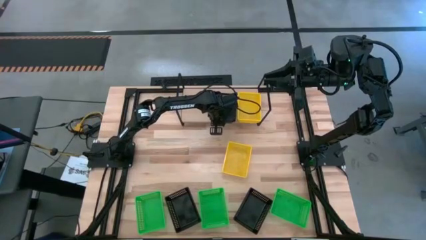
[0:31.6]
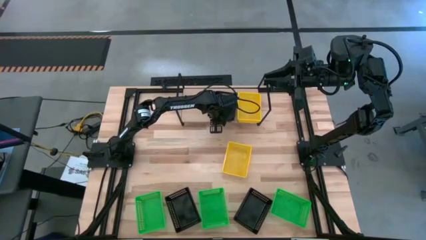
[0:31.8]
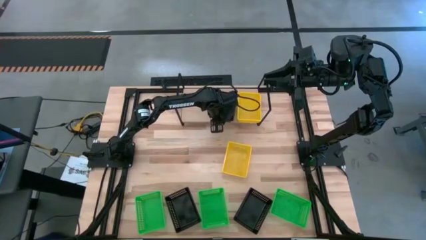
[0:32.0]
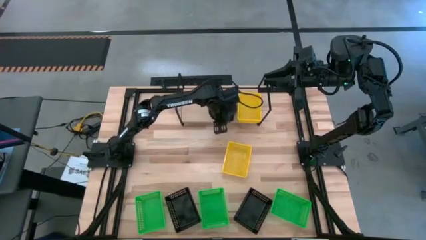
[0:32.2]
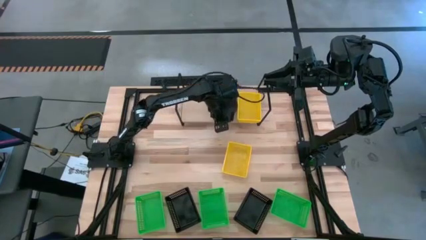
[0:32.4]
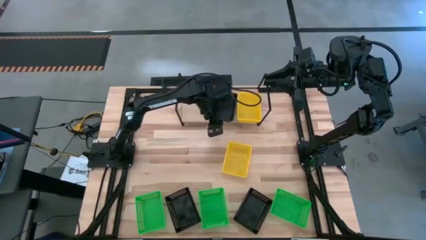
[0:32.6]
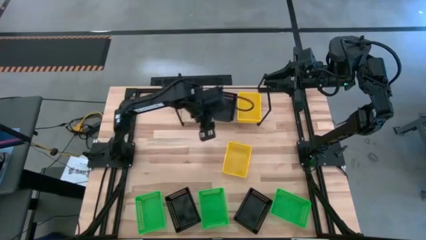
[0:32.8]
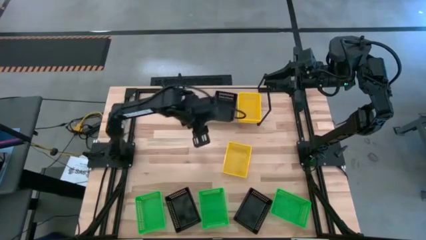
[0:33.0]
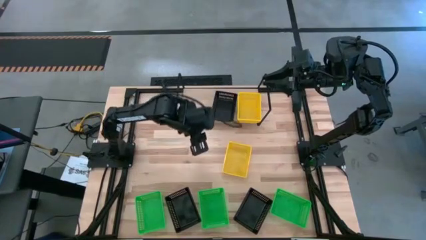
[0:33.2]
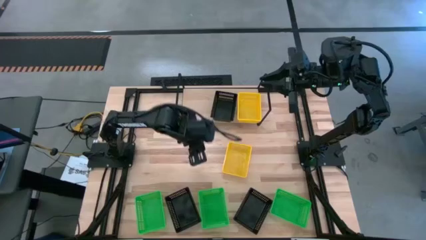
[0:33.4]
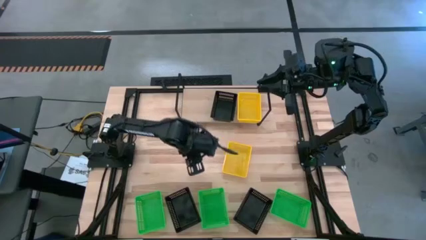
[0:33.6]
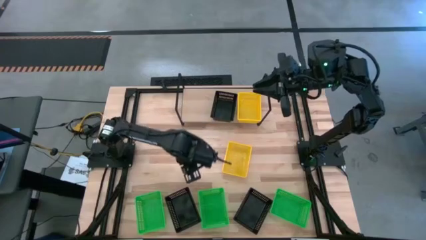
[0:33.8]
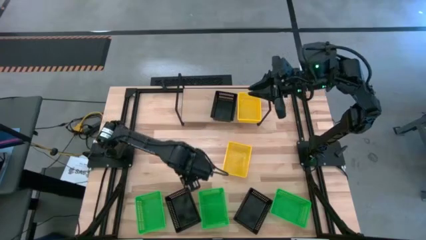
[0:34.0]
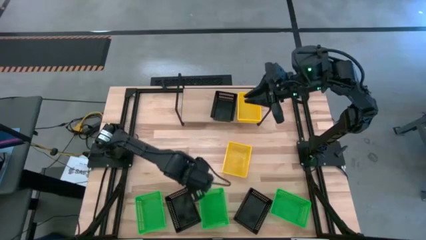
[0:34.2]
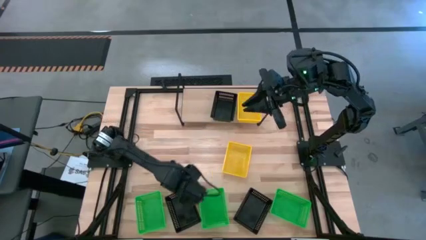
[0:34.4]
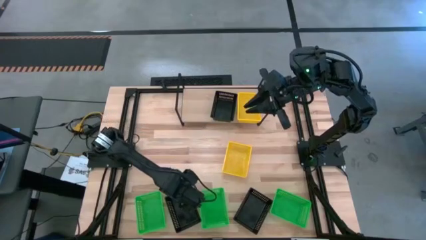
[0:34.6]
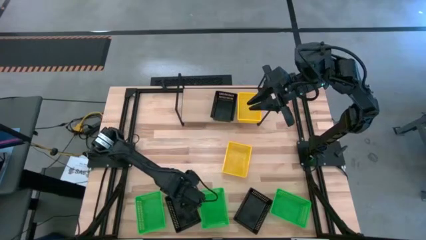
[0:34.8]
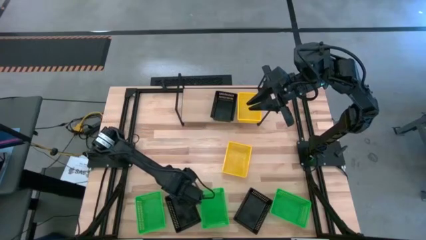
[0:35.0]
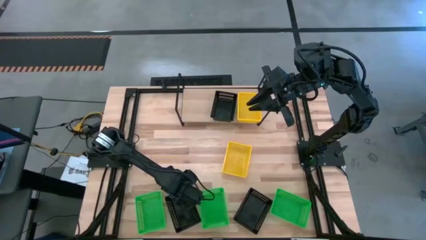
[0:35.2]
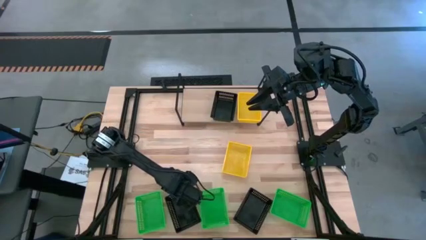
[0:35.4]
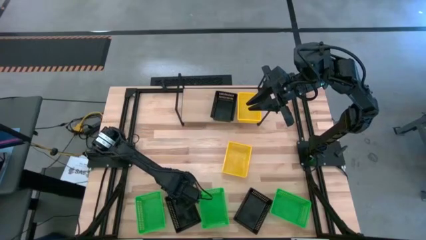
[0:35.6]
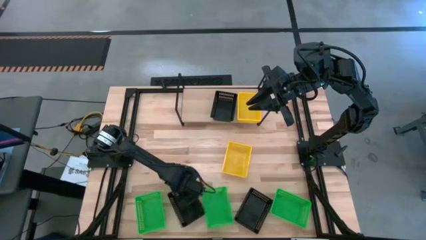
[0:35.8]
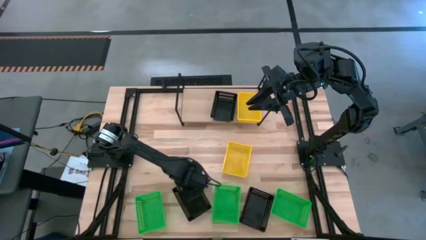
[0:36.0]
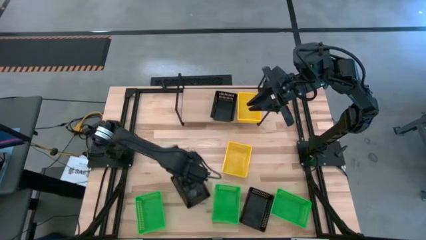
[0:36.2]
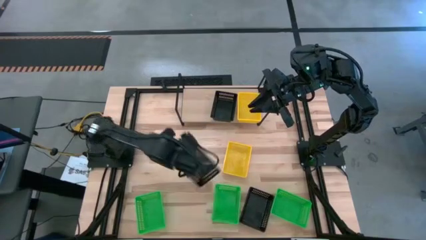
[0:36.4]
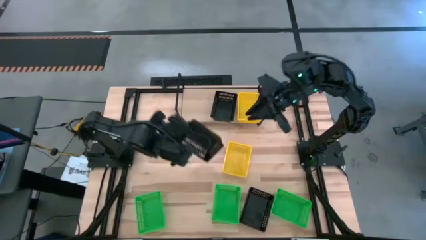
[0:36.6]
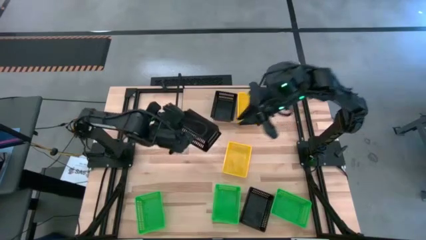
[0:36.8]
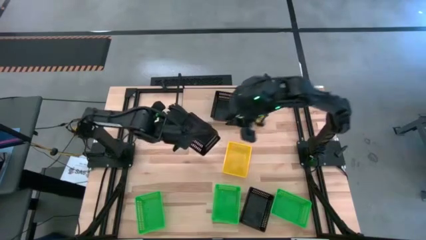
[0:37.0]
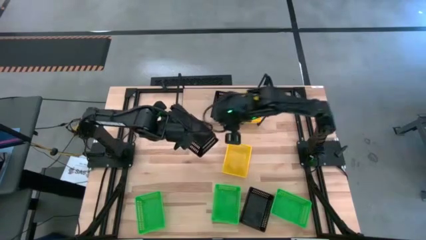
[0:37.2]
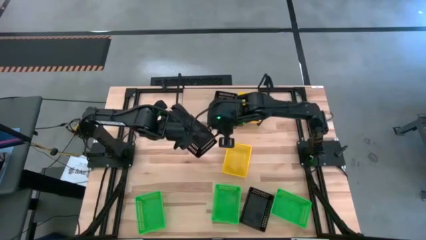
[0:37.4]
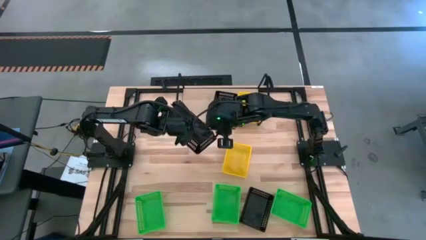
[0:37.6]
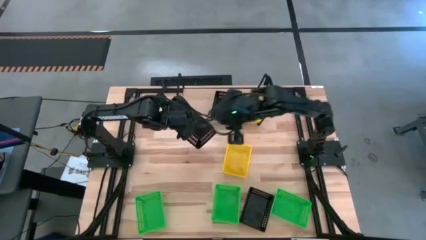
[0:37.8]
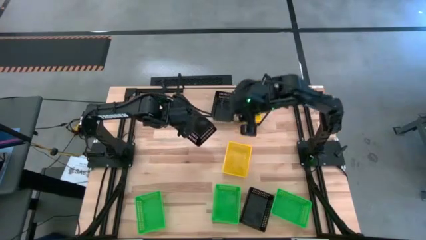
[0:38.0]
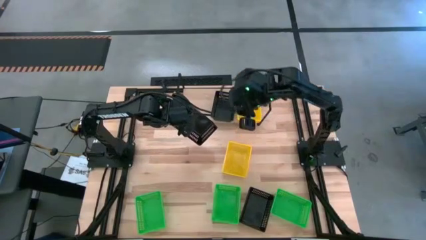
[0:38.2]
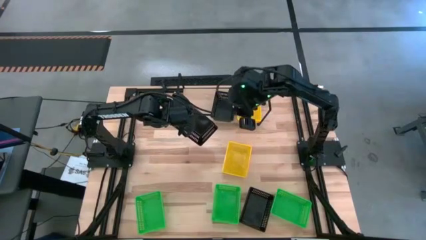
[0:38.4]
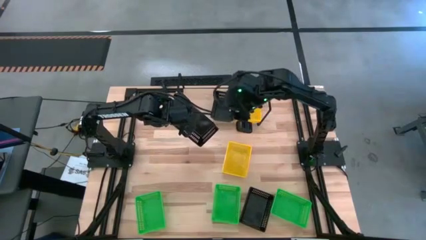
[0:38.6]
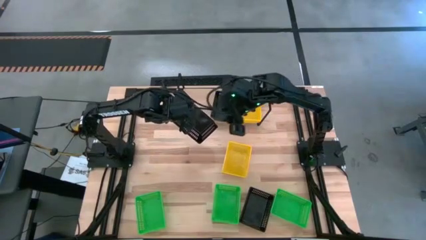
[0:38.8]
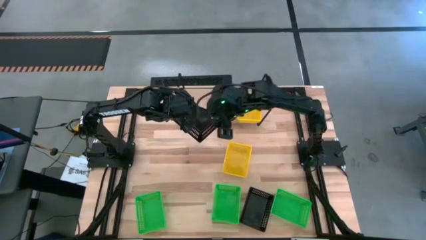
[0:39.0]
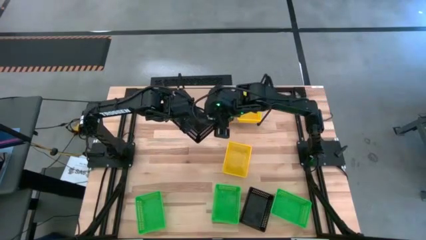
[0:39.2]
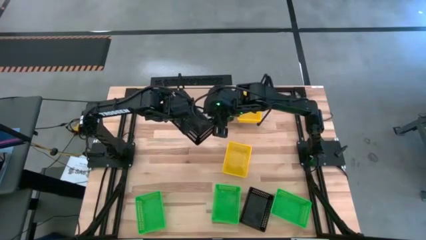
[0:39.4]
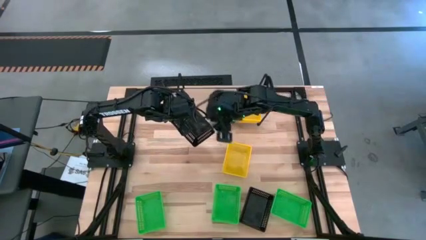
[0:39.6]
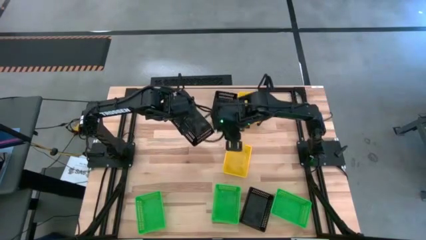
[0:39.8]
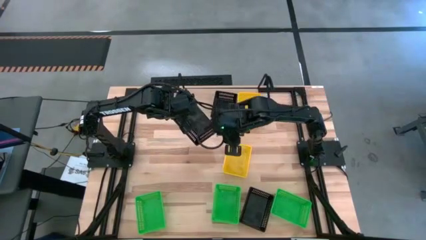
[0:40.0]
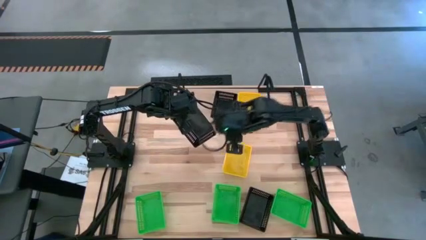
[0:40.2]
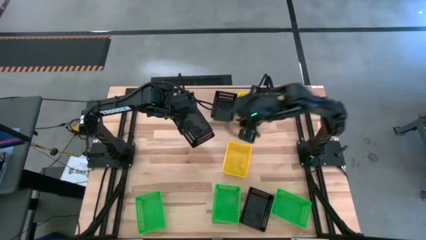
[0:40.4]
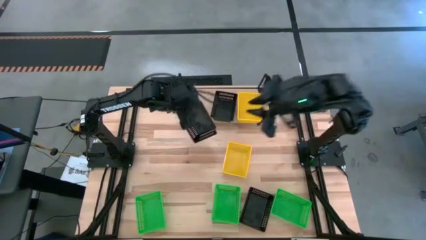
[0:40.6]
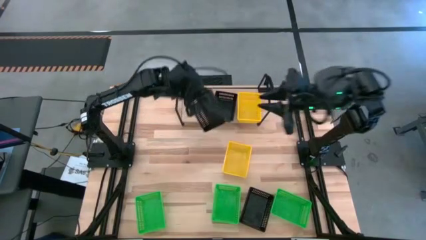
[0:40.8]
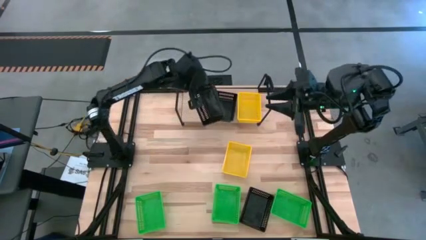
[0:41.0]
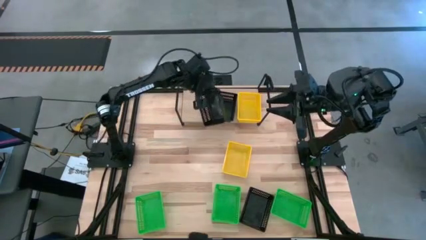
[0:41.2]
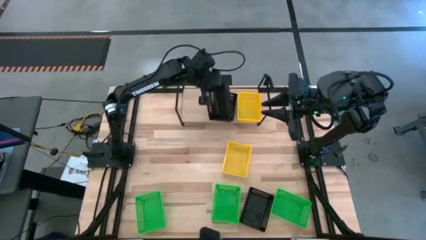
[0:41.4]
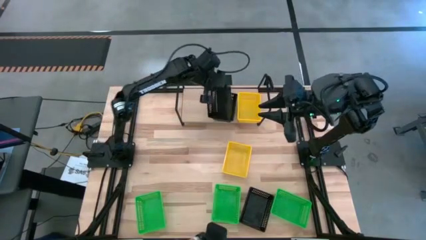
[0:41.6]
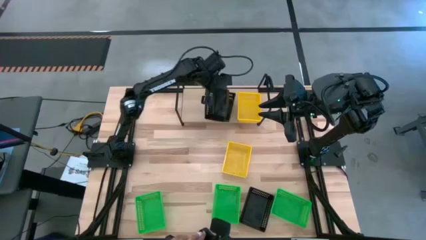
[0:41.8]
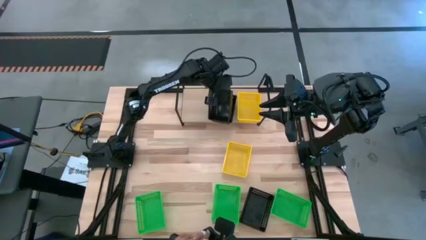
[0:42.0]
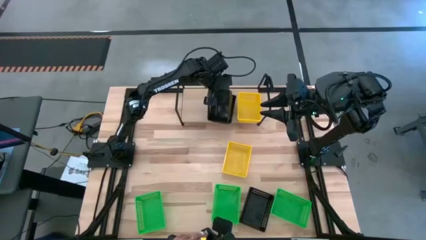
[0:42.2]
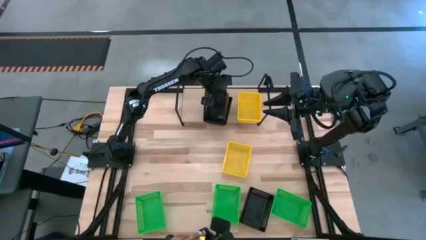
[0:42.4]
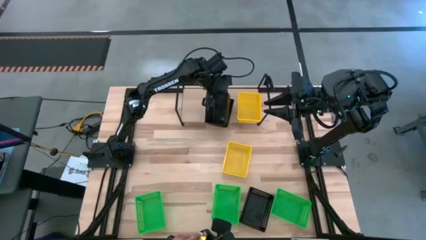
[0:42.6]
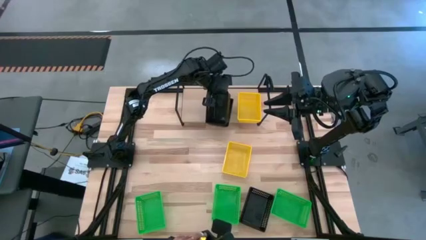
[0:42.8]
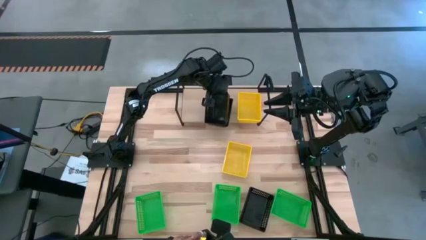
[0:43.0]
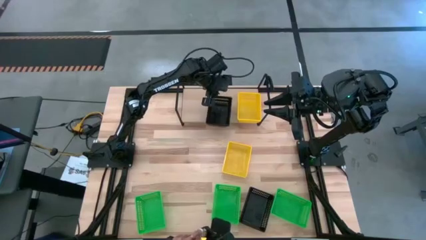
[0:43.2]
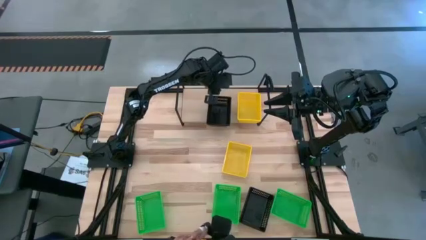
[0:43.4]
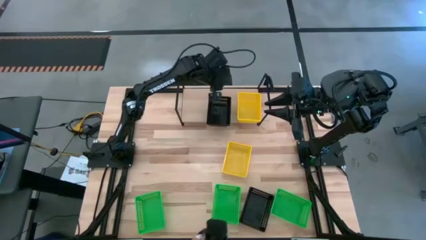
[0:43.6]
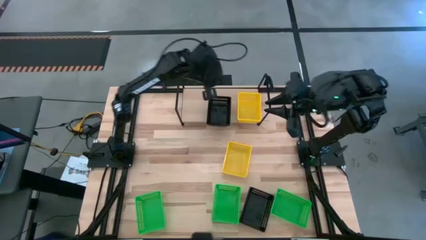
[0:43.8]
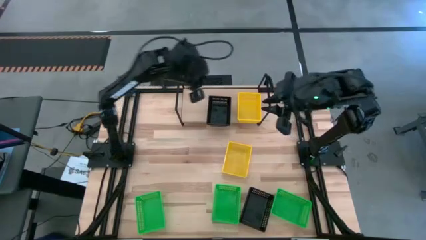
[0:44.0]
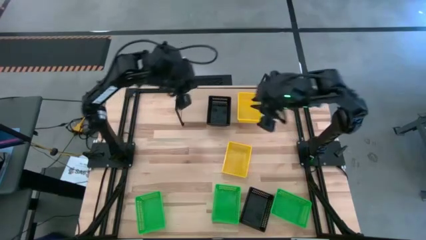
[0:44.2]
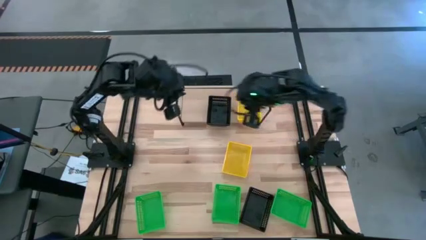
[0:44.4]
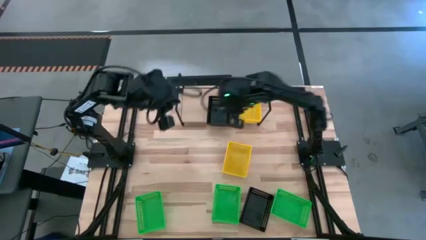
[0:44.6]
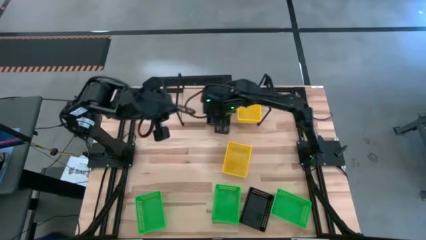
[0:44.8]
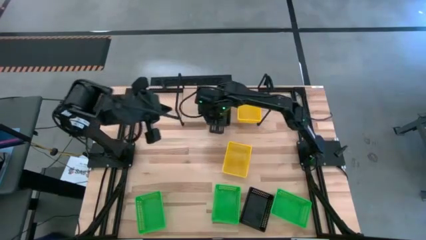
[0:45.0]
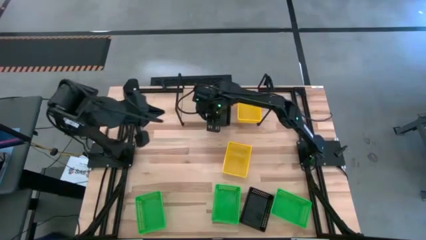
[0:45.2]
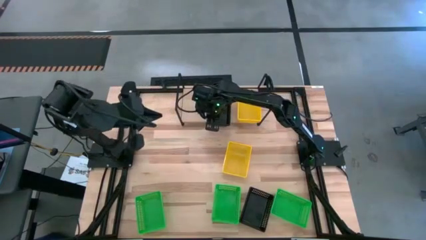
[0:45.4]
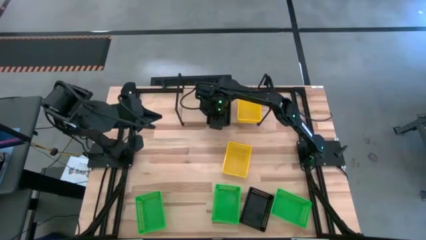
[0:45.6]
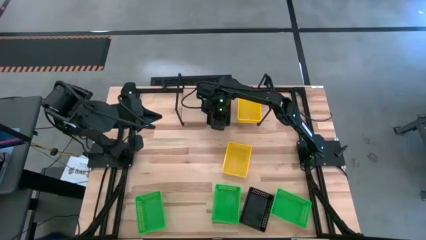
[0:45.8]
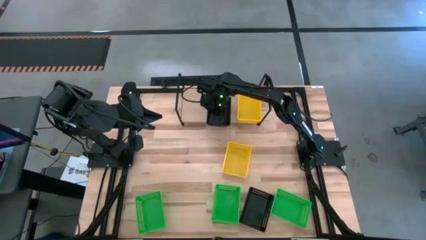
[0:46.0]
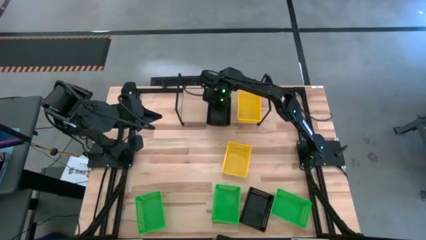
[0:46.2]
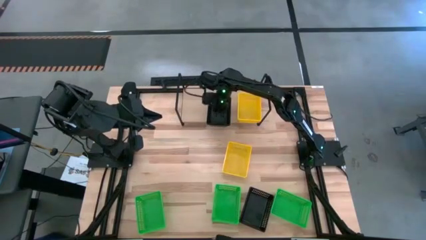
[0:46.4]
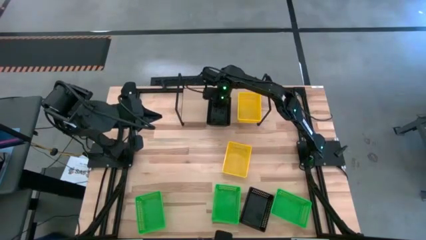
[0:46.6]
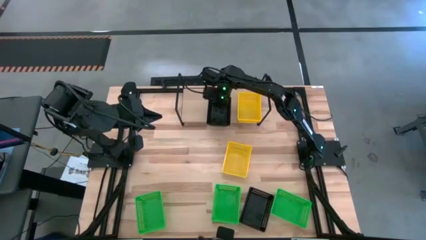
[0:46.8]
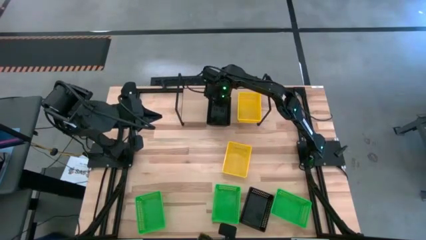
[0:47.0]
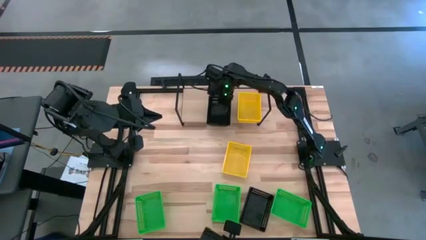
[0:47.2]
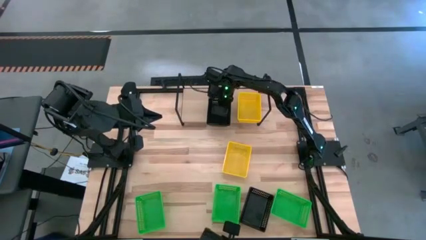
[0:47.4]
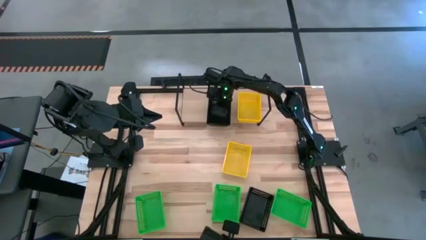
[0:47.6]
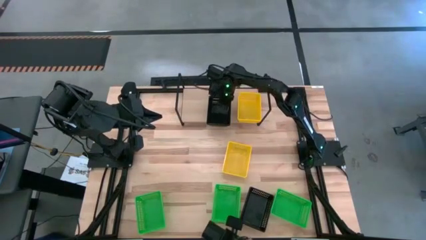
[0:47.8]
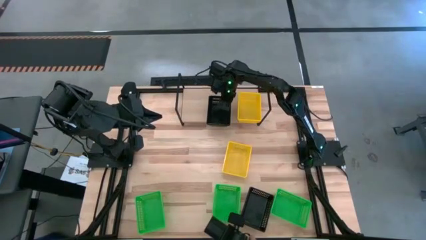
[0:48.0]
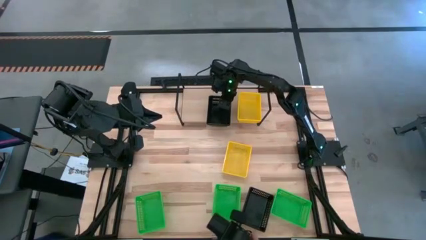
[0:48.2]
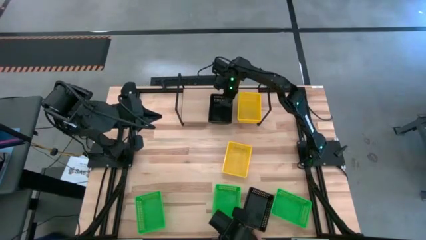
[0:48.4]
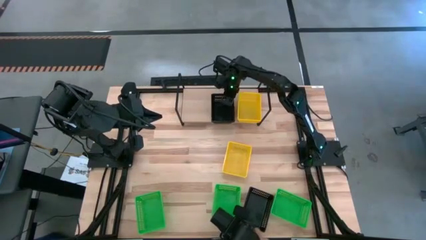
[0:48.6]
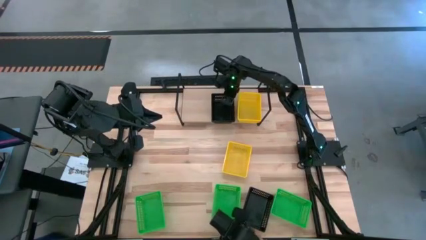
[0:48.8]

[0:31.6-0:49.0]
Task: Stack baskets on shelf by color
Stack the left black bin on top of the black bin
